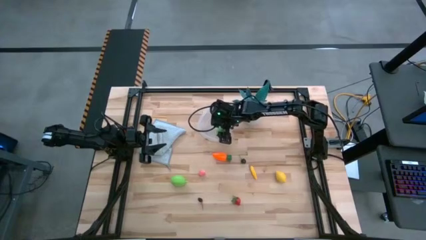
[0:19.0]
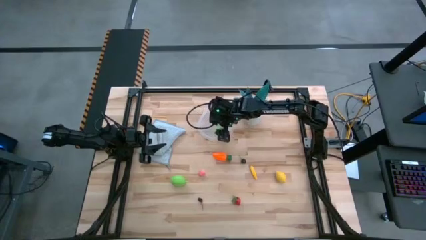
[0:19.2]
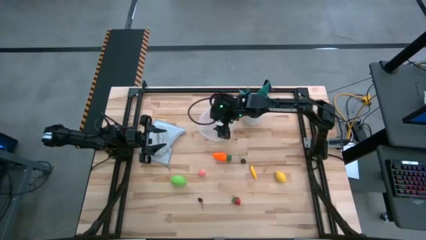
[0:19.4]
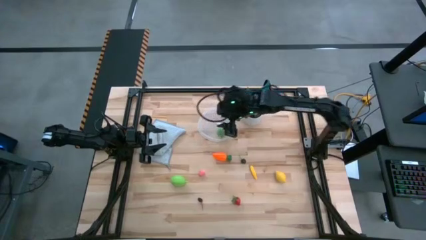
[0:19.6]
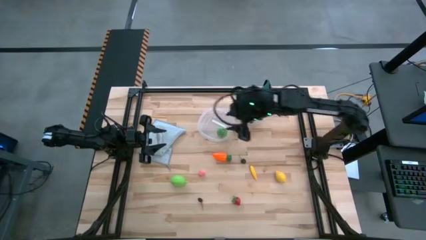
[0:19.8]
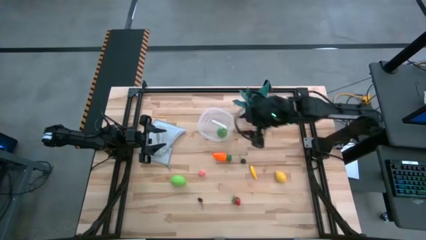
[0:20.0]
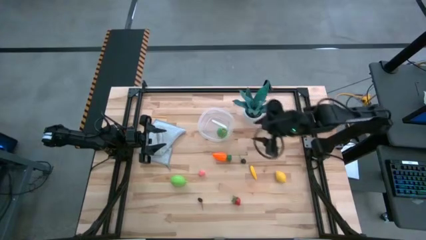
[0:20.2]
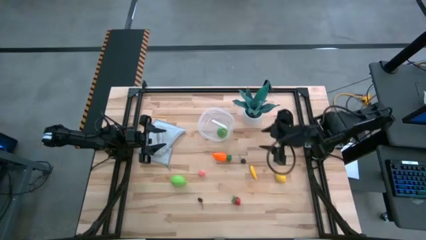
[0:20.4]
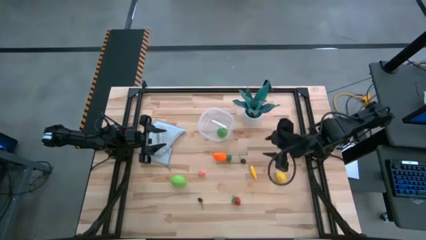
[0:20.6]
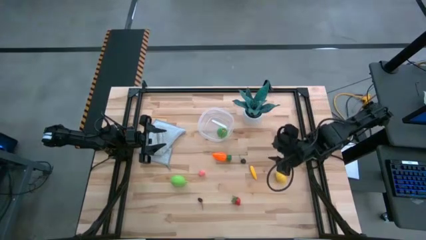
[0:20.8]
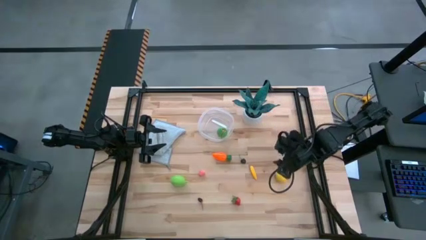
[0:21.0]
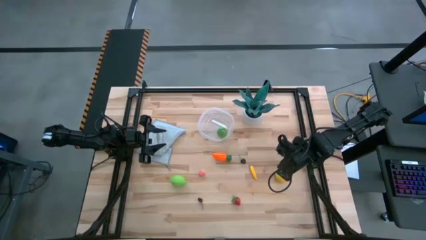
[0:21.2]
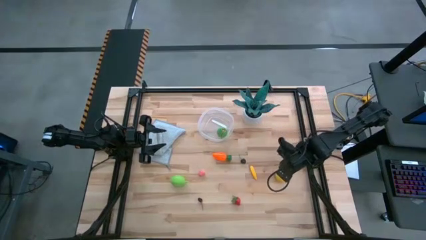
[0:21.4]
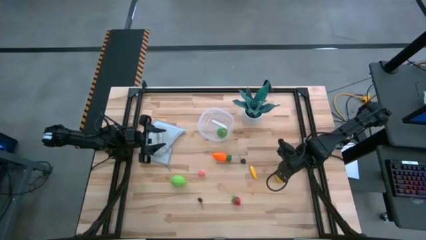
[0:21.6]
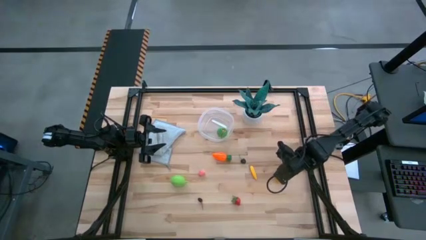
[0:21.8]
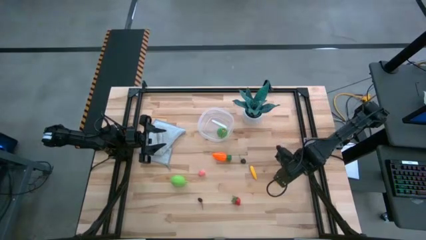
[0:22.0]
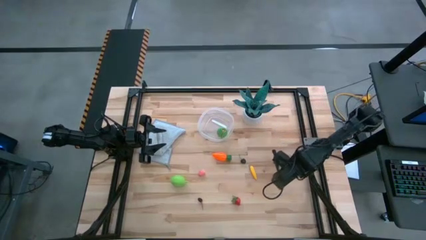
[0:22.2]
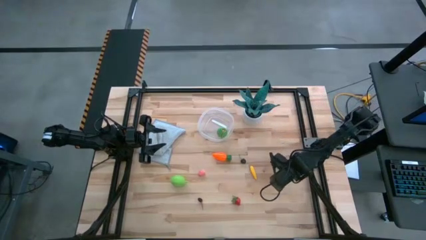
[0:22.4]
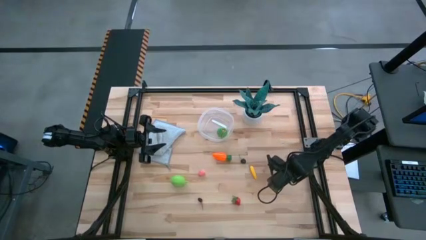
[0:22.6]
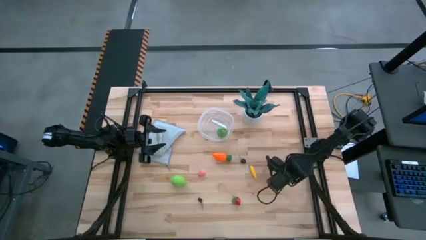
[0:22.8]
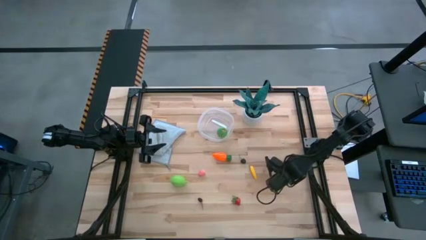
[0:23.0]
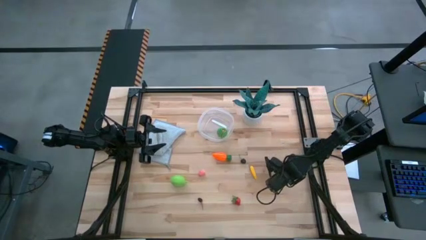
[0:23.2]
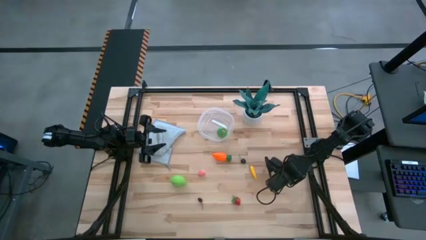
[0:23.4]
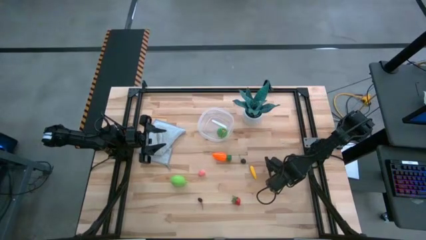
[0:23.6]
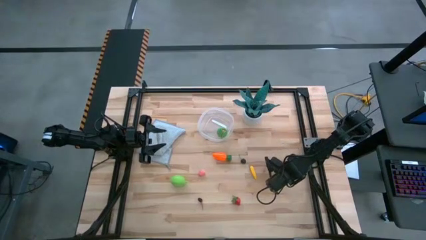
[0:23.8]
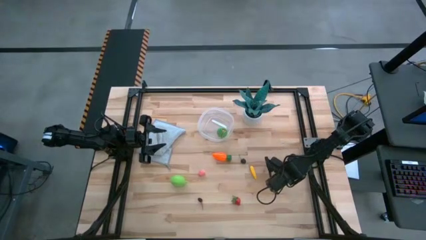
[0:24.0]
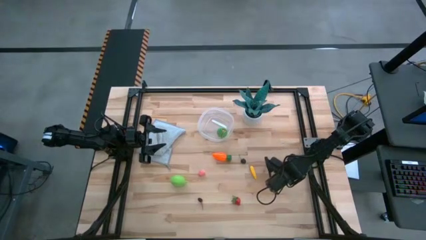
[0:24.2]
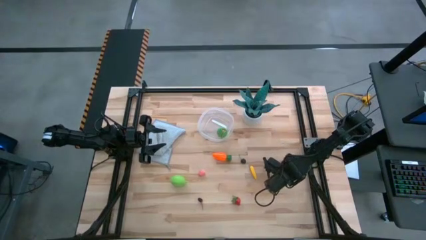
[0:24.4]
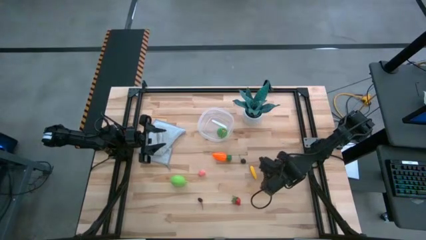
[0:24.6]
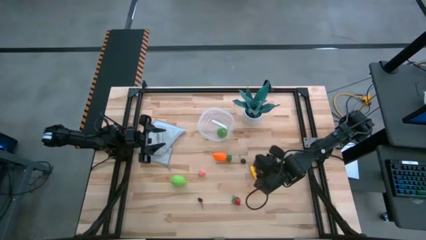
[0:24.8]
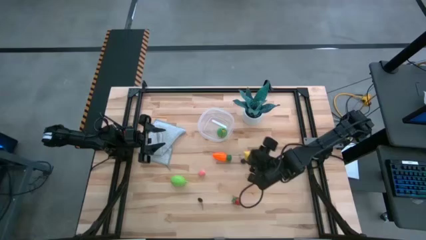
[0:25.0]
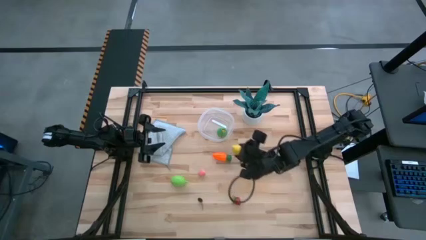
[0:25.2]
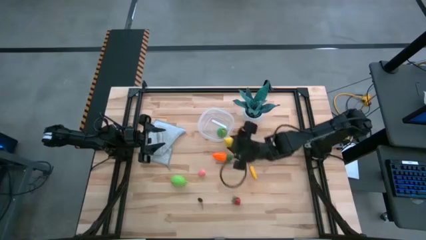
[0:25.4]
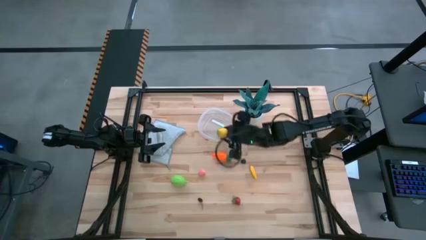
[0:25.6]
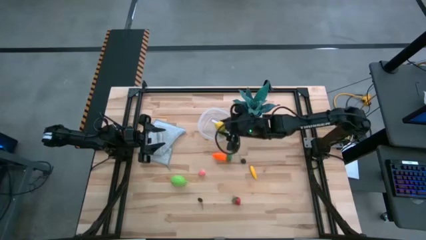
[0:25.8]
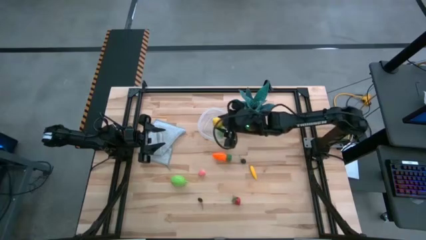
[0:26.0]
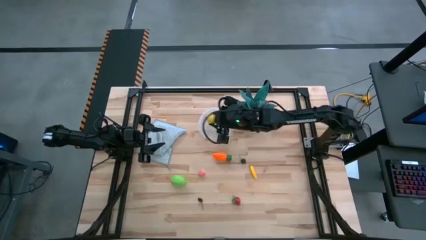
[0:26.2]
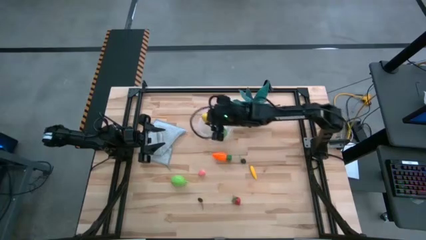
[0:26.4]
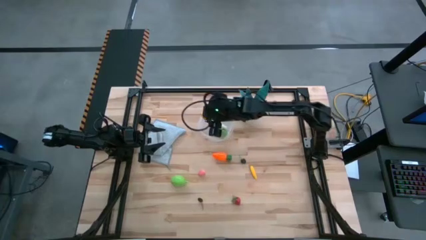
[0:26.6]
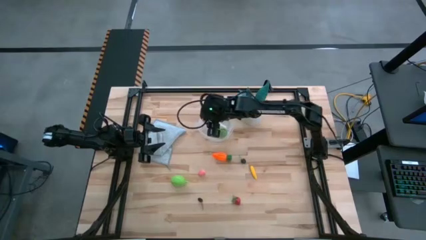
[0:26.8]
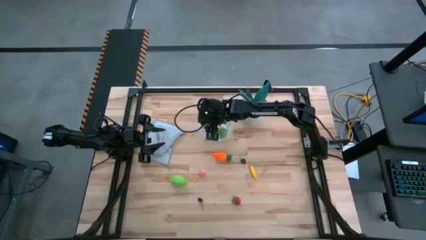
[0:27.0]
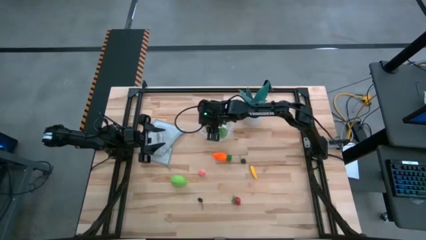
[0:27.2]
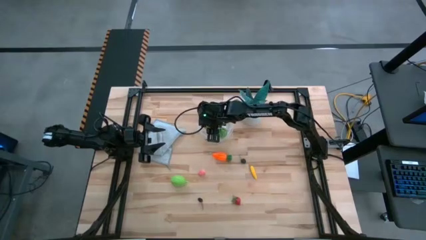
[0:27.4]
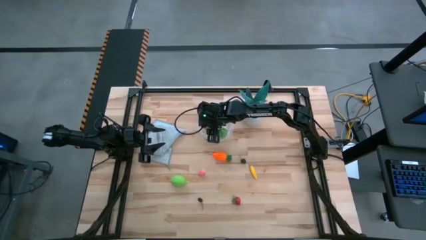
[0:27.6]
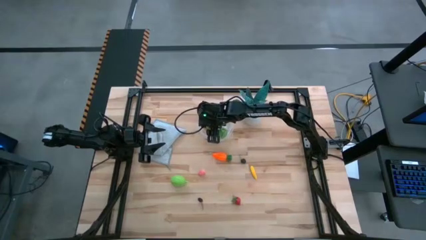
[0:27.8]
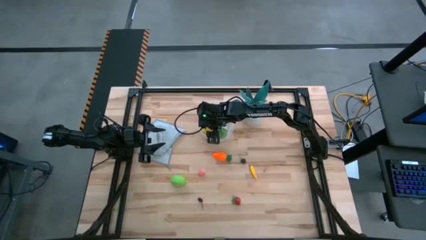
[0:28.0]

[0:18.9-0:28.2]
Task: Pick and placing Produce into tupperware
Put the lemon into the transparent container

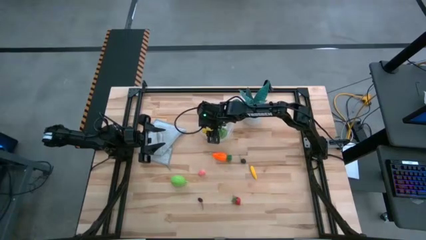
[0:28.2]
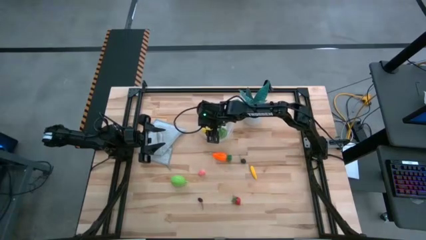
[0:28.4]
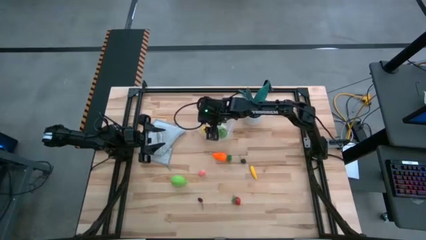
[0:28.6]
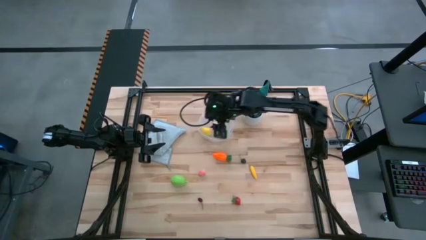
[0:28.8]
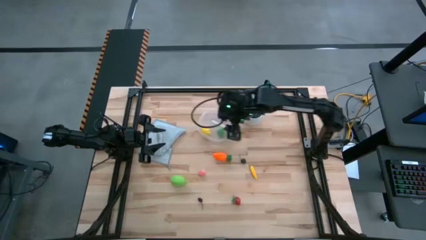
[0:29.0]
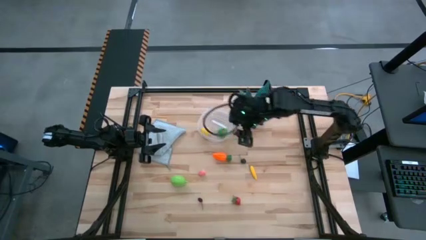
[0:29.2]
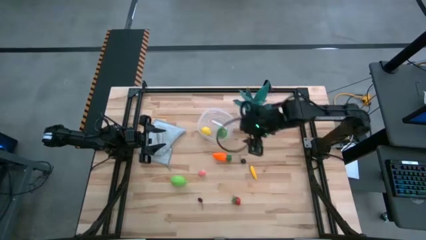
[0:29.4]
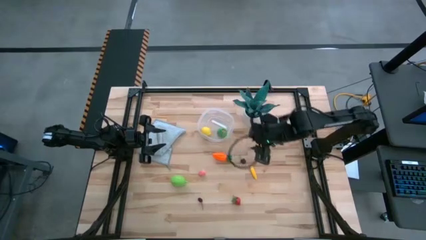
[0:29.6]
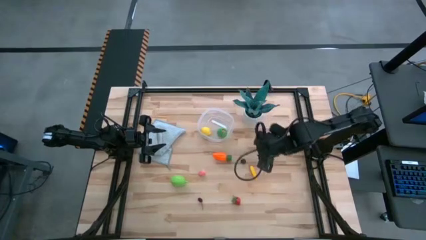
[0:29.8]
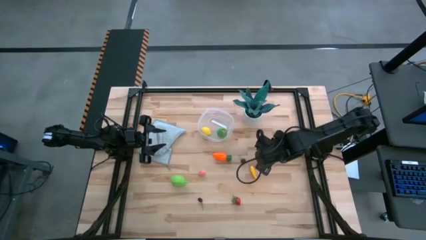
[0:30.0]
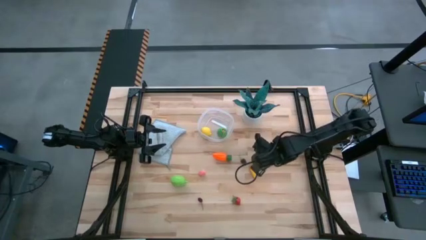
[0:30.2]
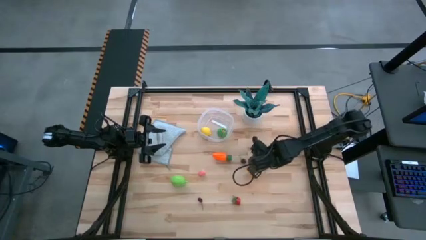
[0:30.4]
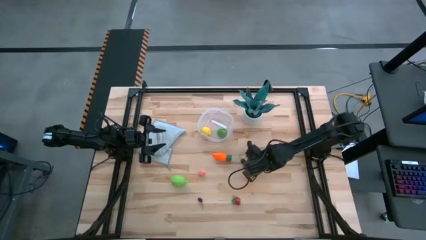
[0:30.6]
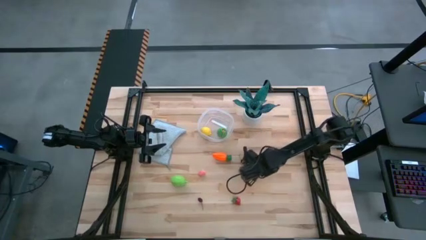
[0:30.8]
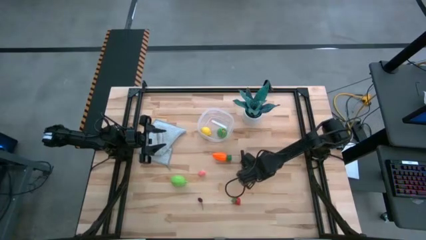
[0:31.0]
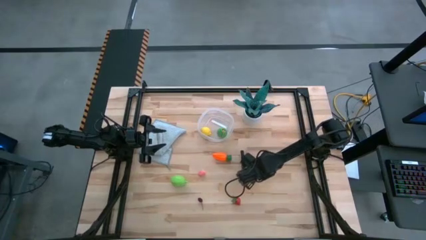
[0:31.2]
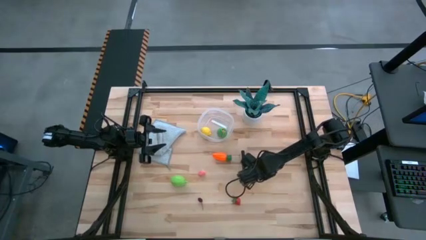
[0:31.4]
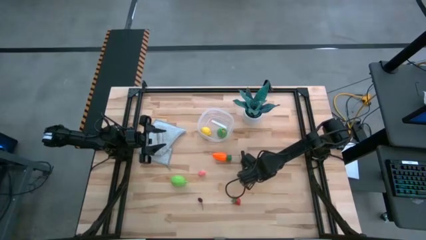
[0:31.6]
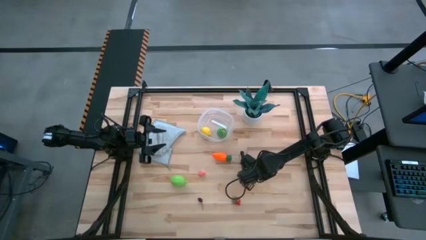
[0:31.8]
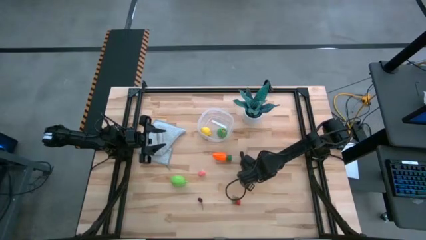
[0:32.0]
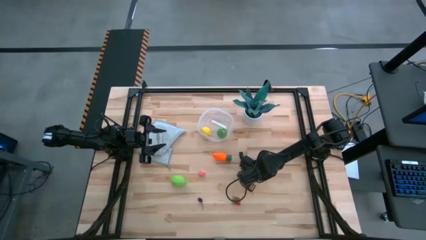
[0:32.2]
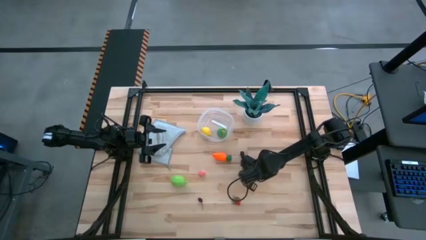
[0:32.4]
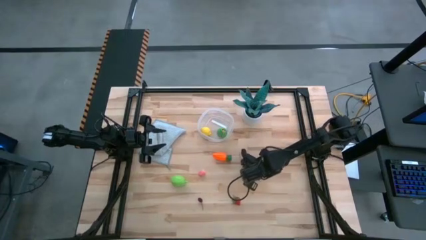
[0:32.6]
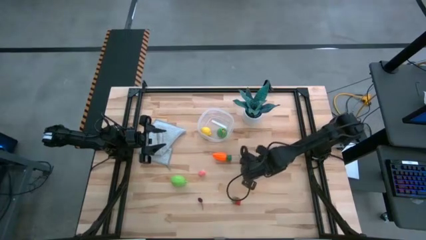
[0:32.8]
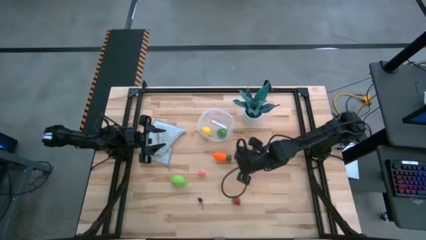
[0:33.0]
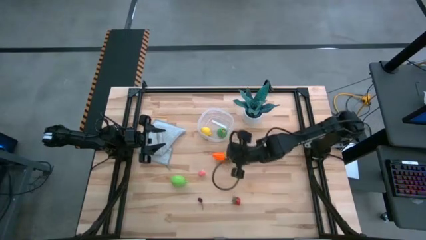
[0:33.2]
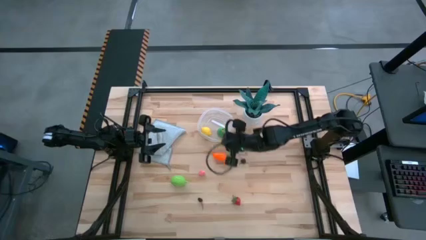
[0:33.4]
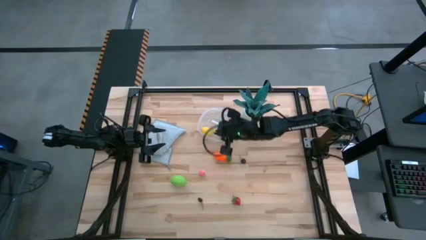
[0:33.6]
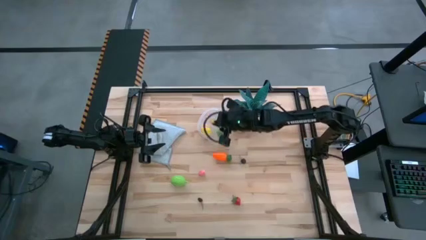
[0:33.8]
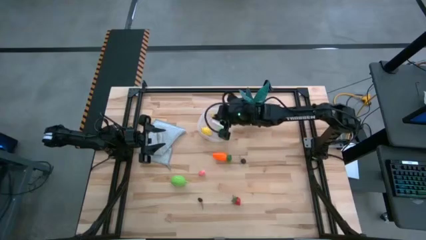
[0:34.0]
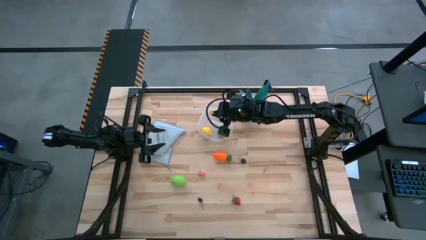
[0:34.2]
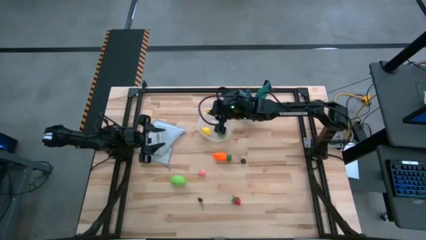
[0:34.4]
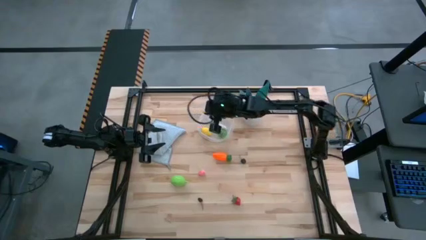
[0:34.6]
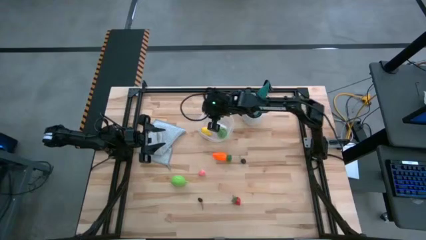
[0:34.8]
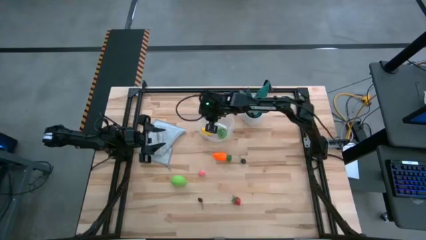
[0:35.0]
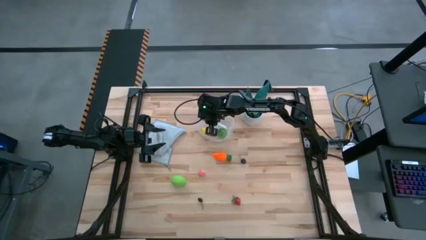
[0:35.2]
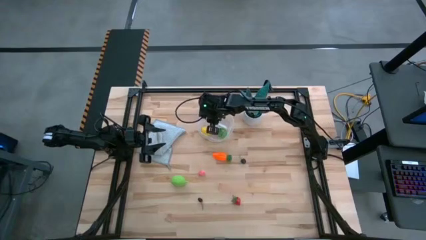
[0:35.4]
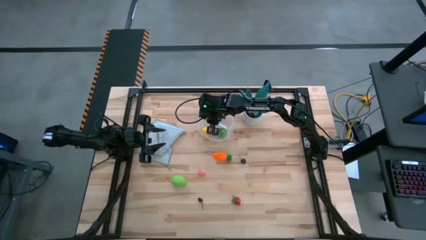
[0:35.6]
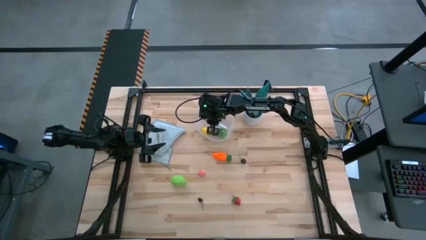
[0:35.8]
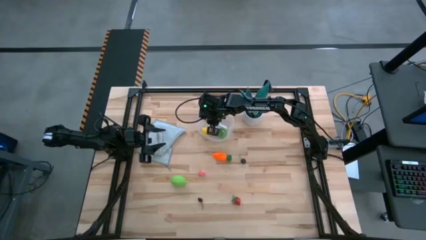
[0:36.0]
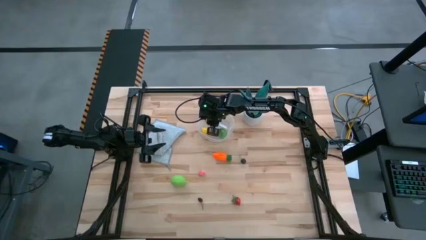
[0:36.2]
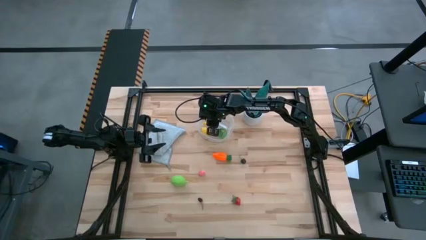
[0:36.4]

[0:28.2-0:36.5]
Put the yellow corn into the transparent container
